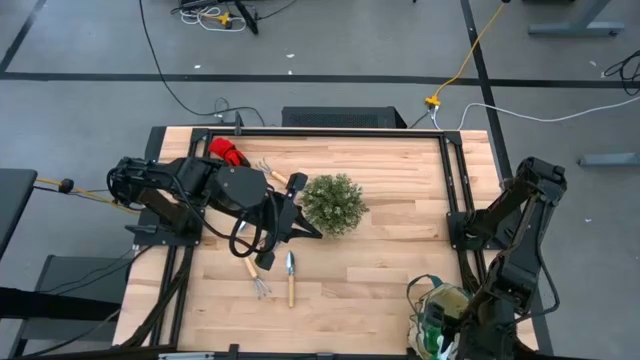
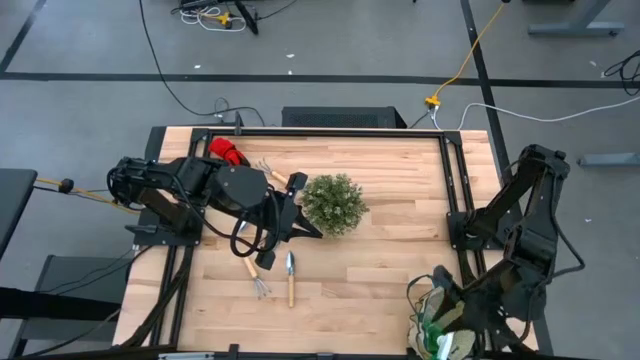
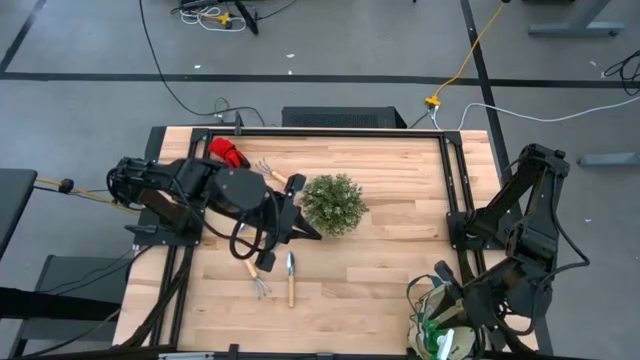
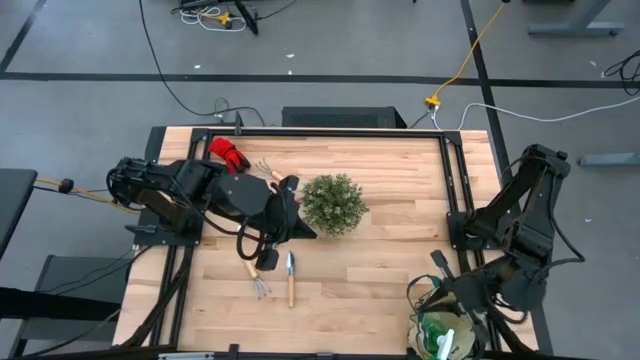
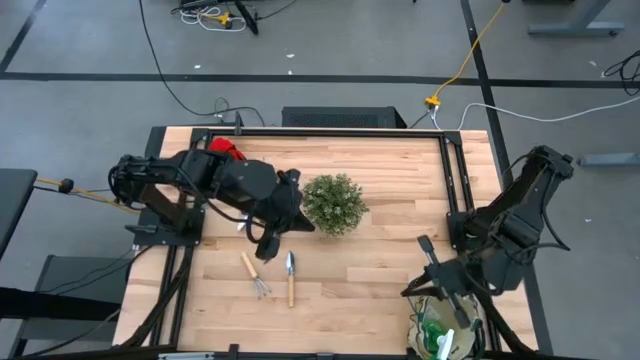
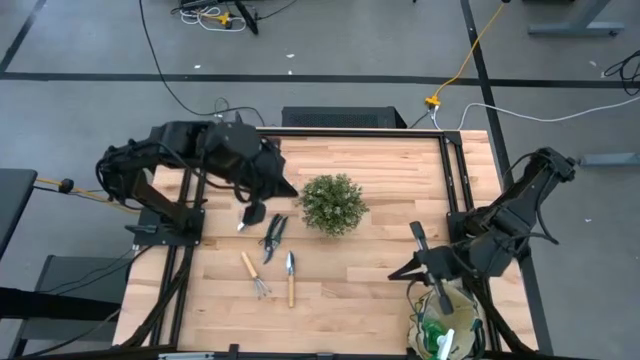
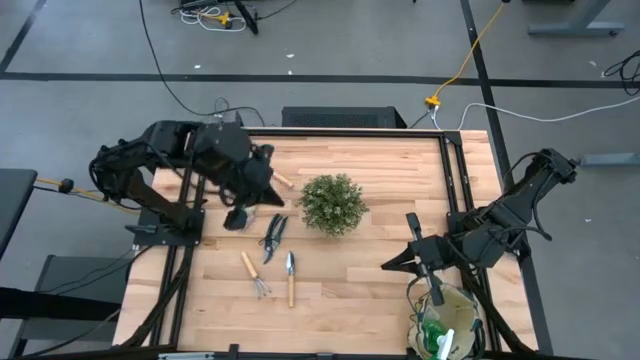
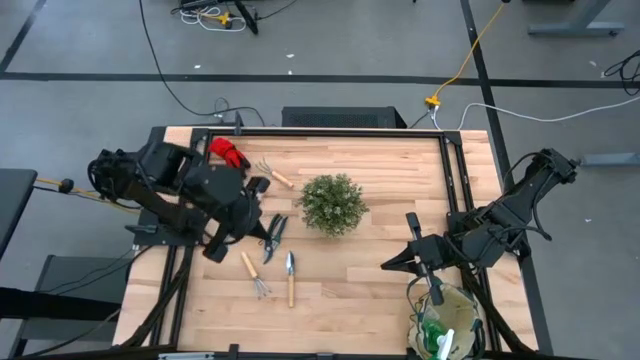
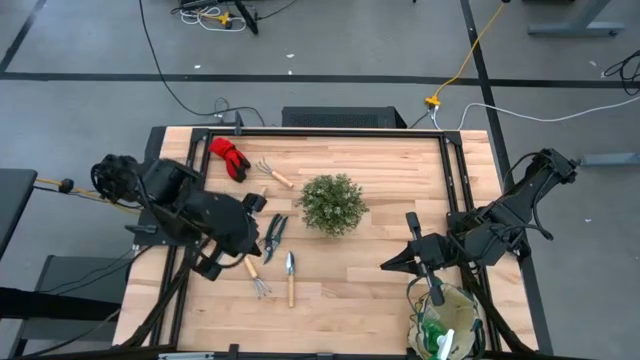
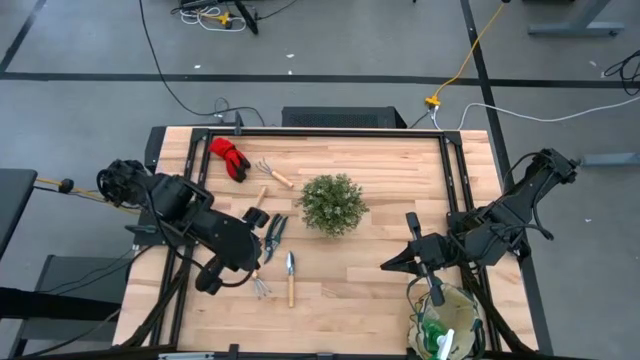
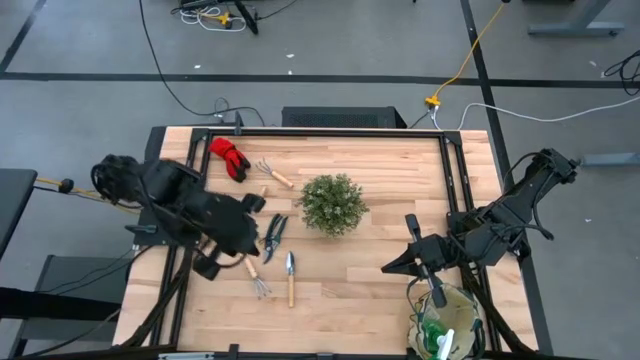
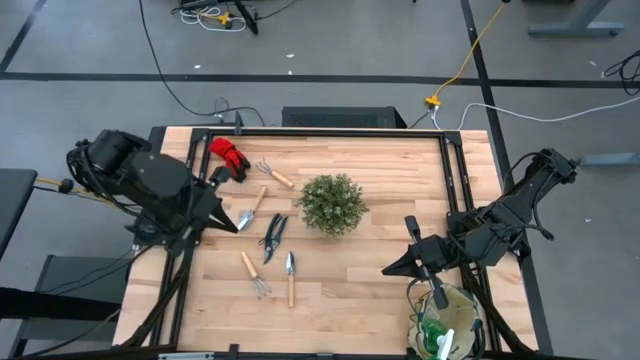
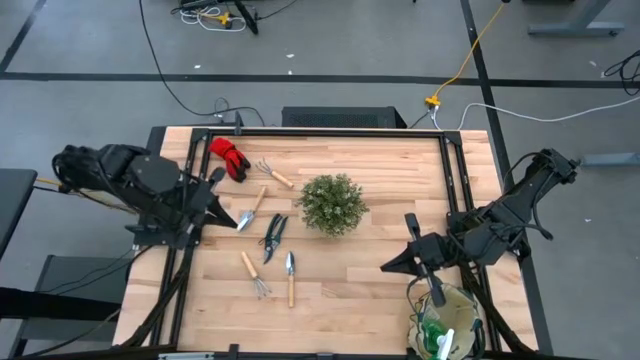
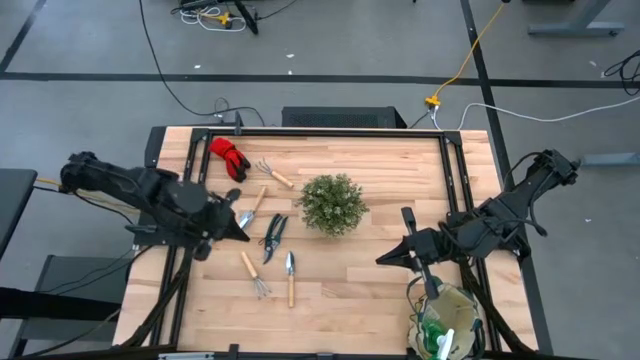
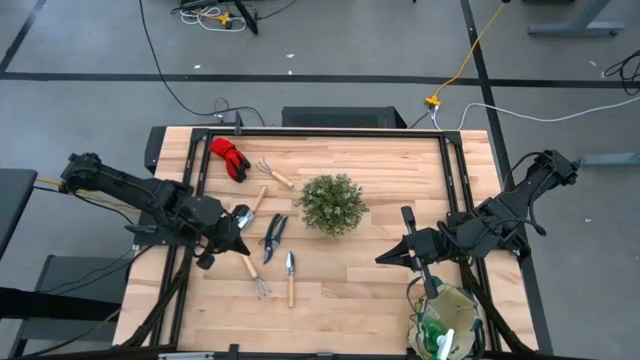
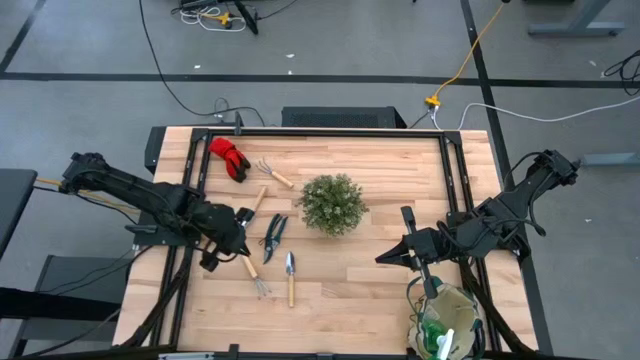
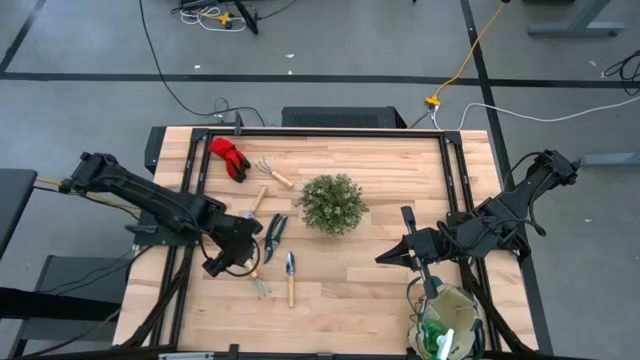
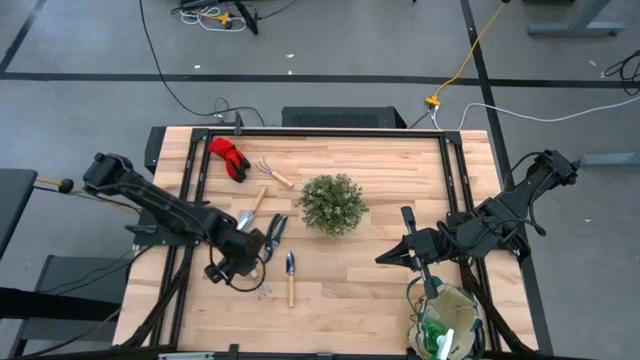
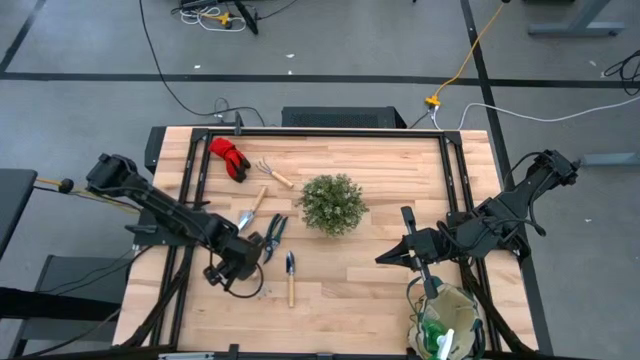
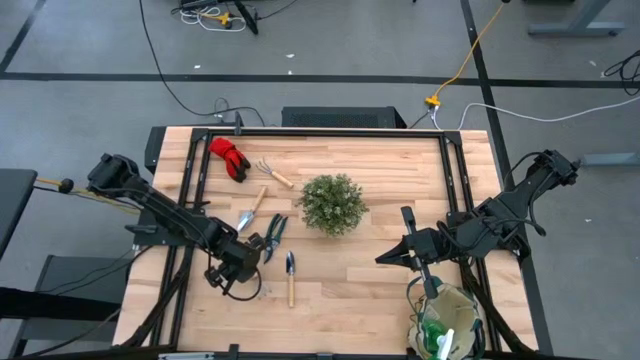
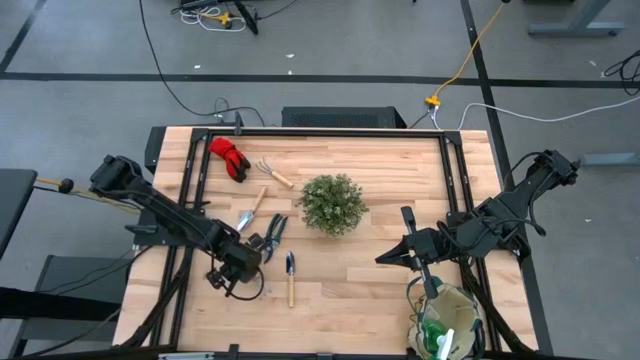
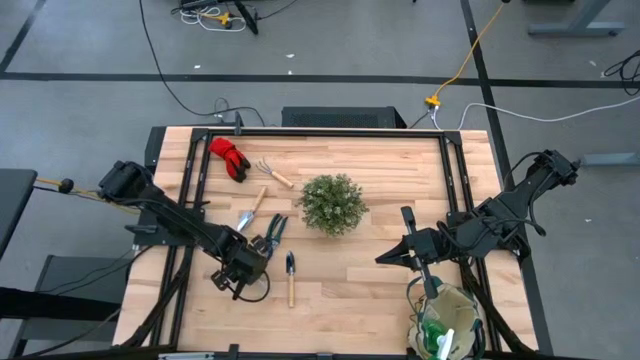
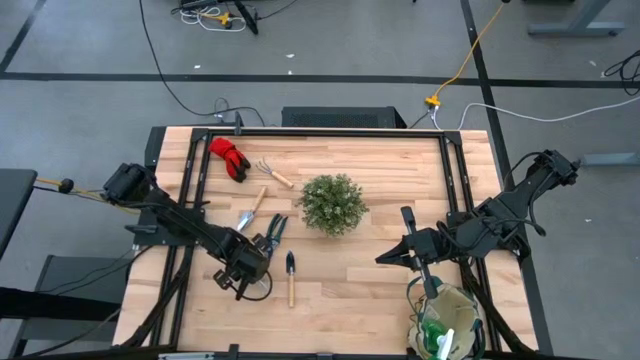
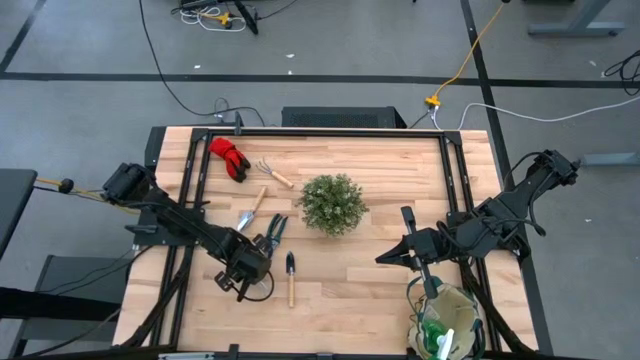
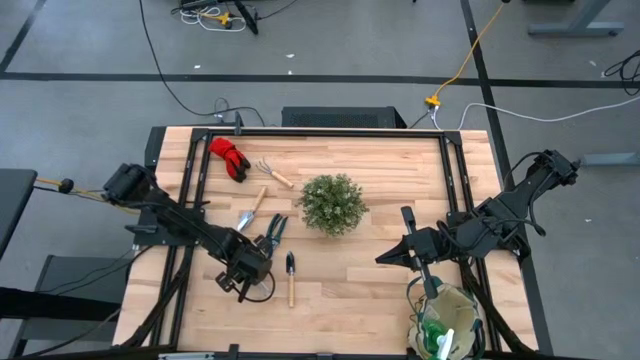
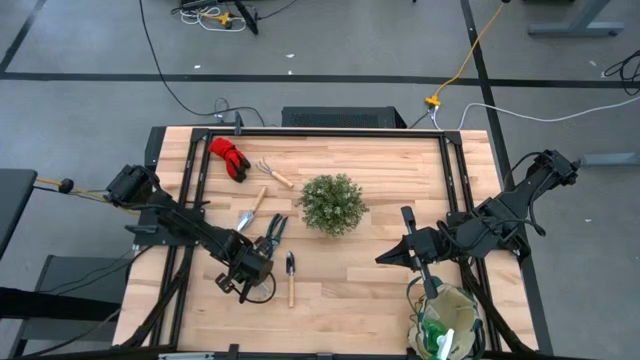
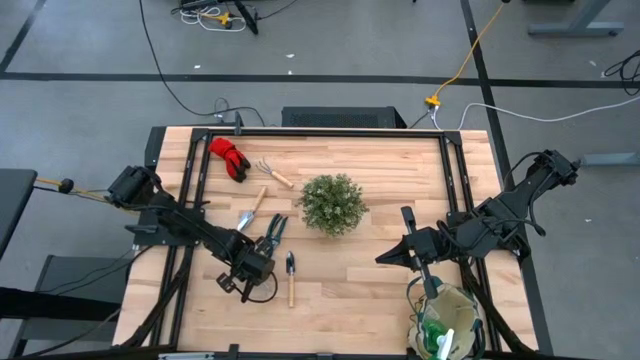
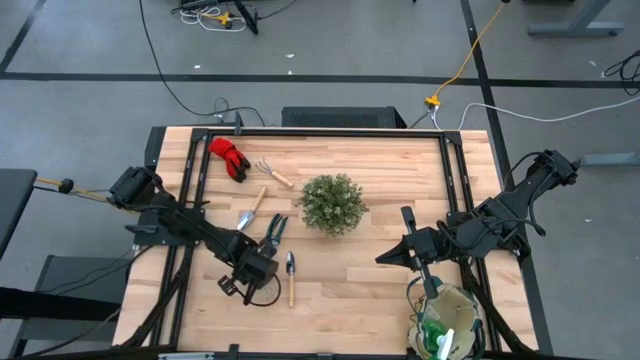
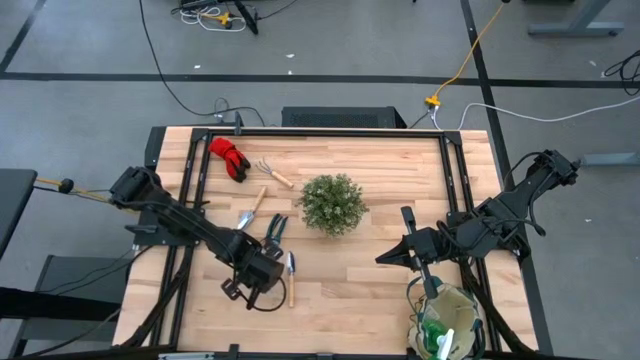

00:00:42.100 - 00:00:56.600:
Task: Pick & Place Garden tools in Gardening bag
Put the bottom brown hand rake into the white gardening bag

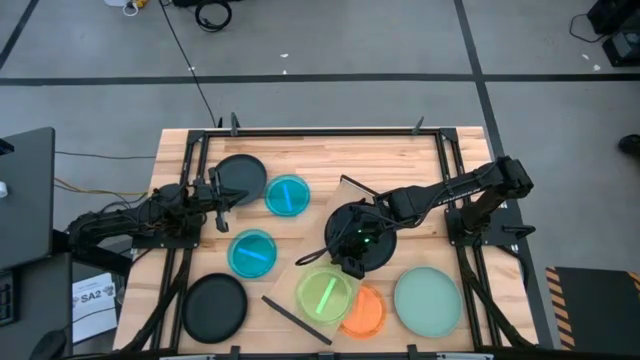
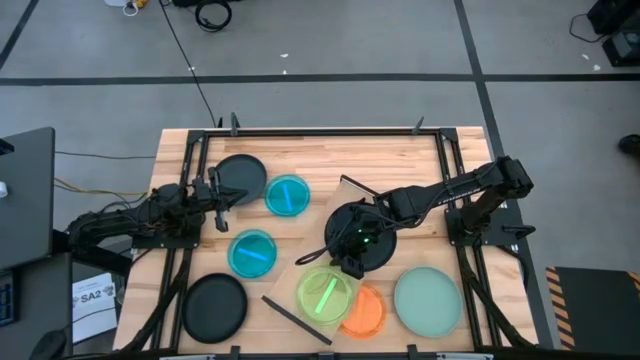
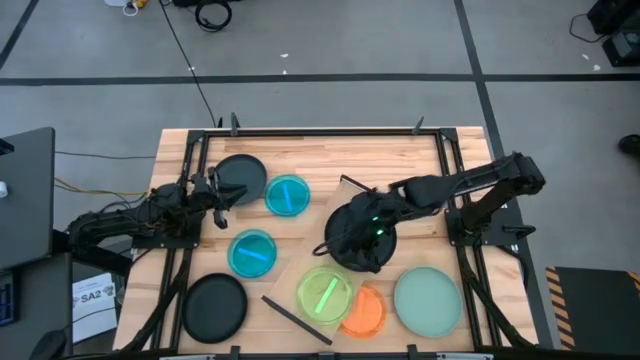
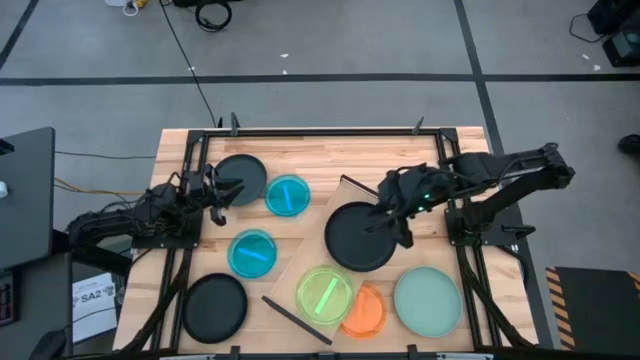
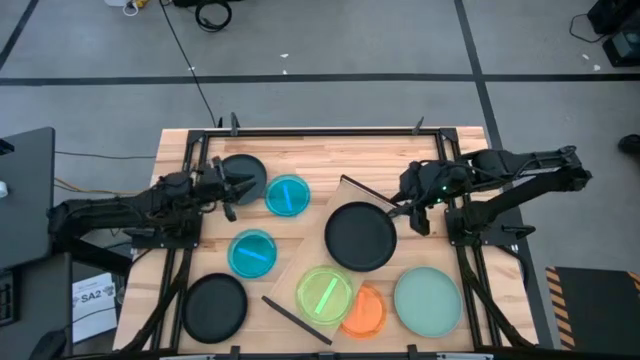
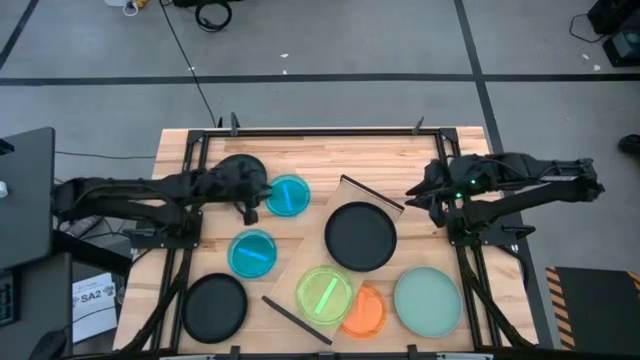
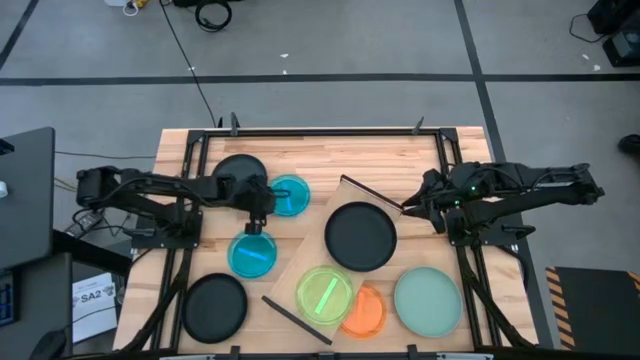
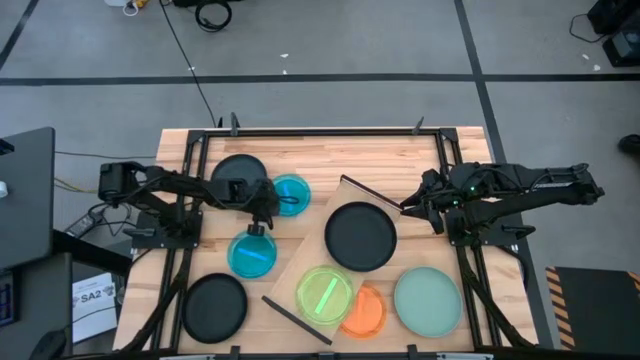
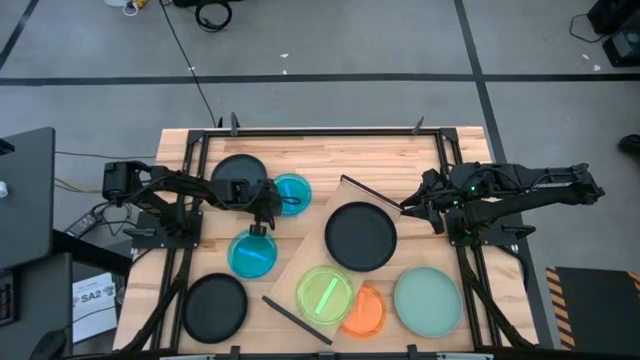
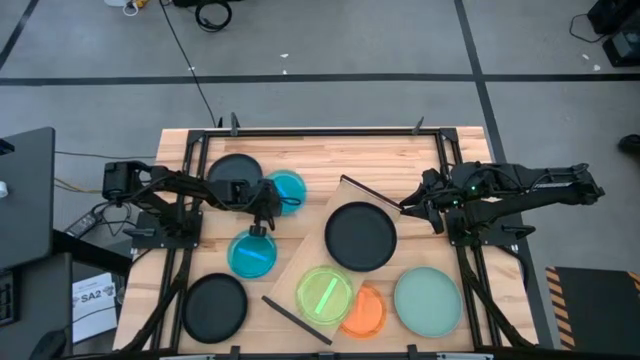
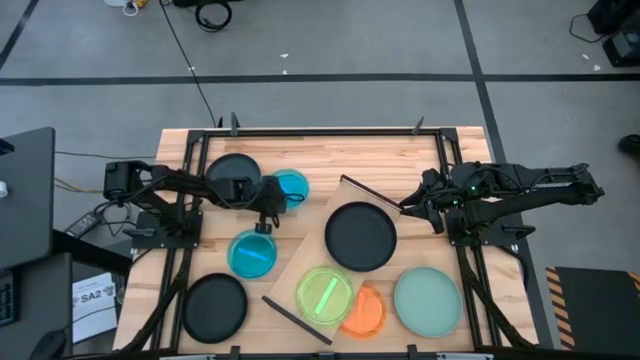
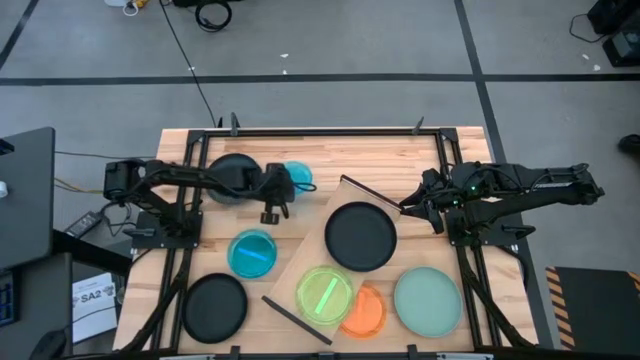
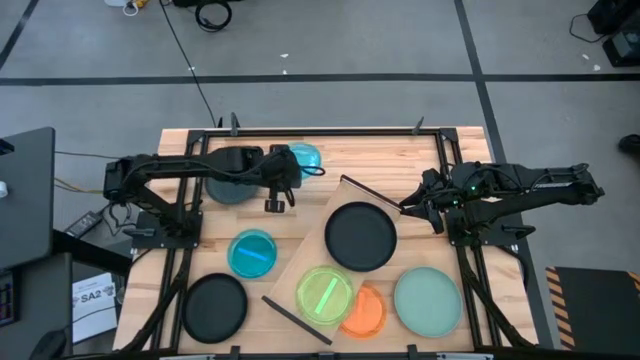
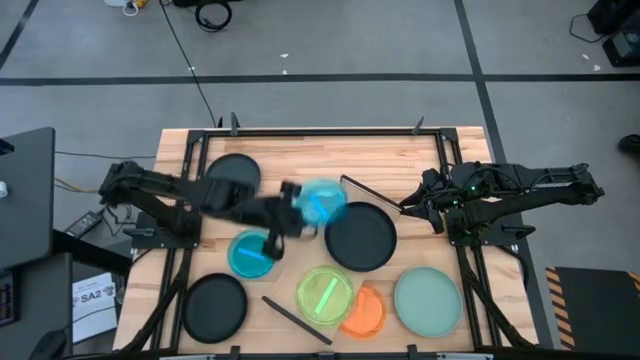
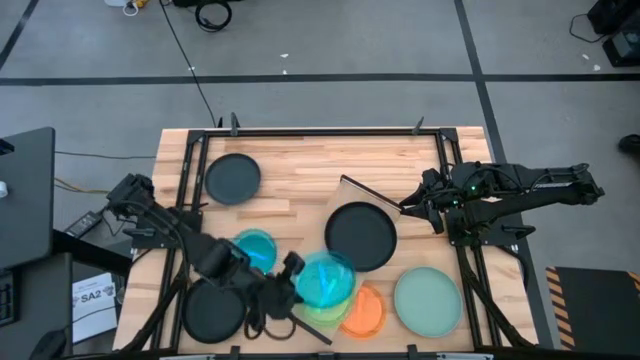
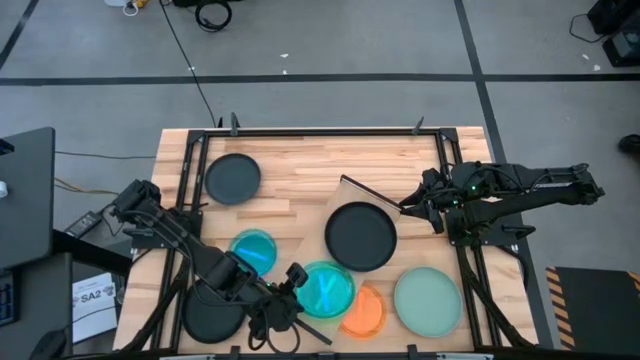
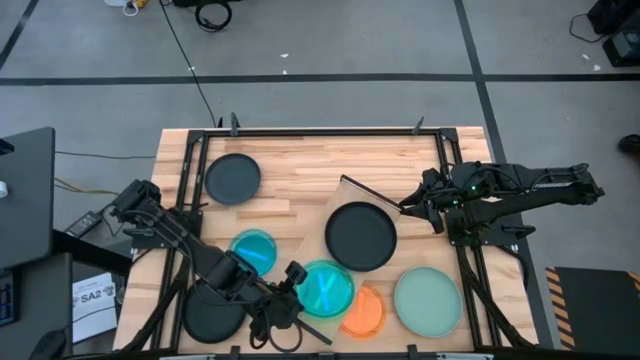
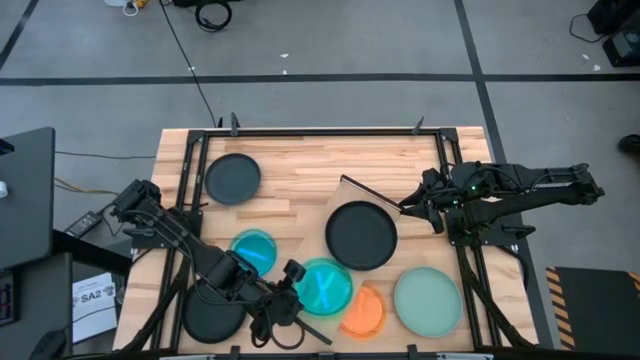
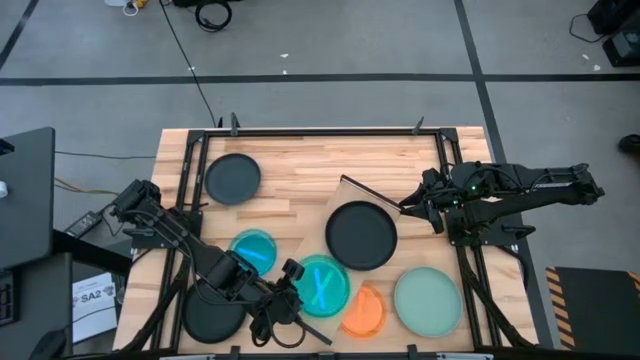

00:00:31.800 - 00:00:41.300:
Task: Place and stack plates onto a shelf
Stack the top blue plate on top of the green plate on the shelf
